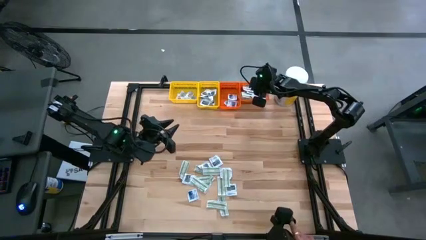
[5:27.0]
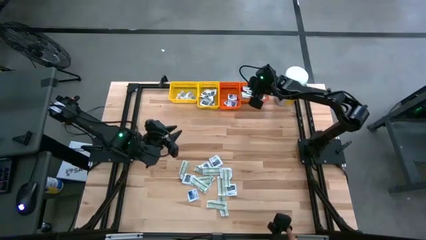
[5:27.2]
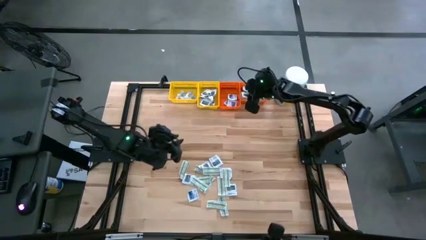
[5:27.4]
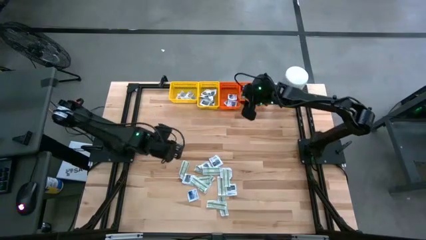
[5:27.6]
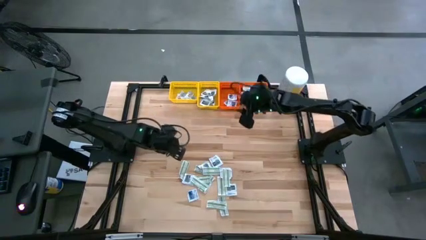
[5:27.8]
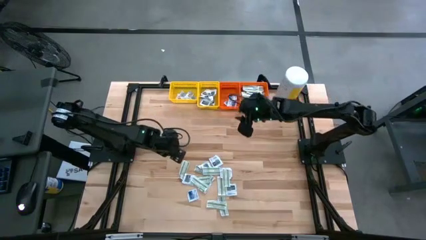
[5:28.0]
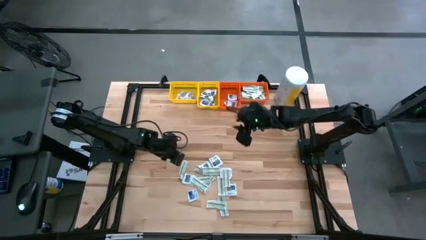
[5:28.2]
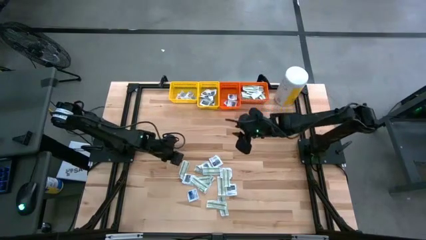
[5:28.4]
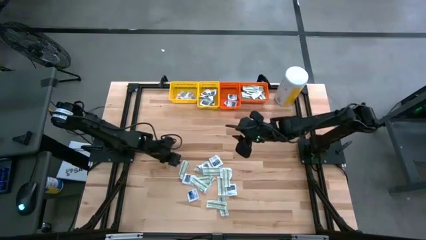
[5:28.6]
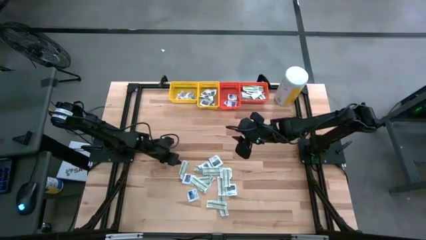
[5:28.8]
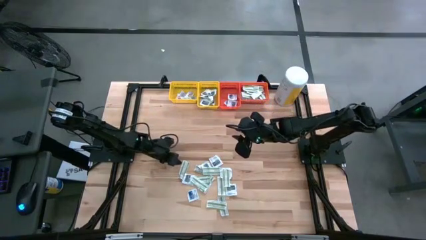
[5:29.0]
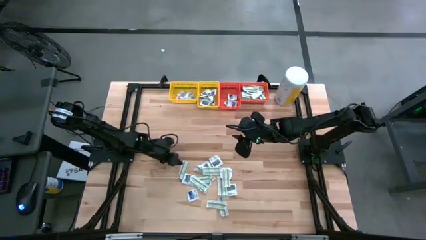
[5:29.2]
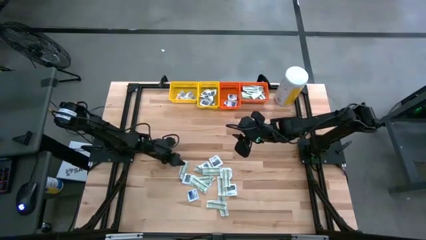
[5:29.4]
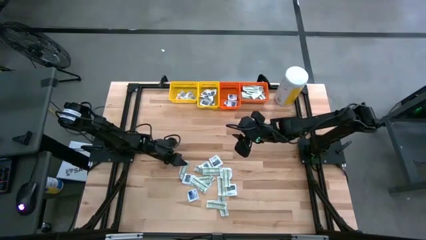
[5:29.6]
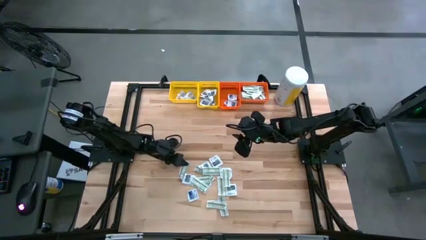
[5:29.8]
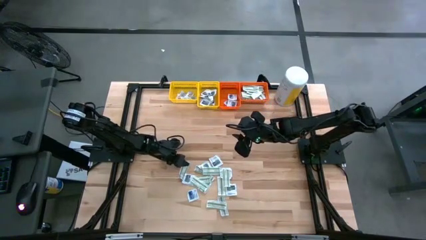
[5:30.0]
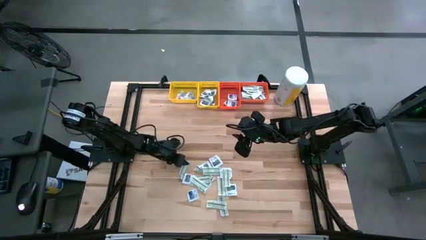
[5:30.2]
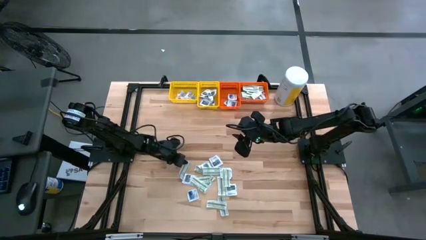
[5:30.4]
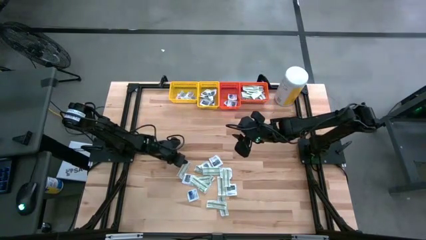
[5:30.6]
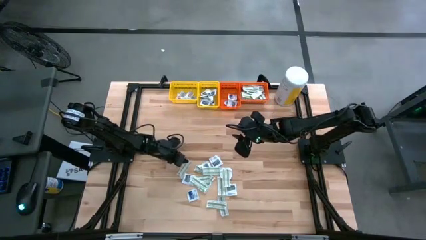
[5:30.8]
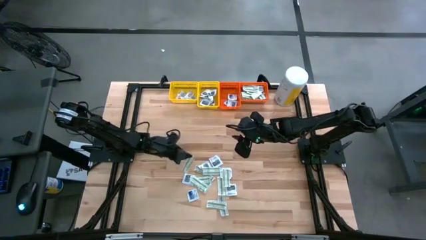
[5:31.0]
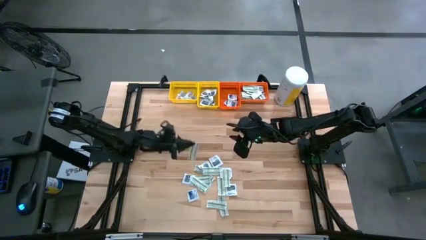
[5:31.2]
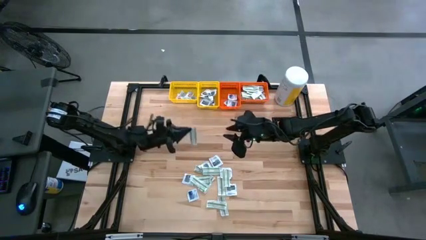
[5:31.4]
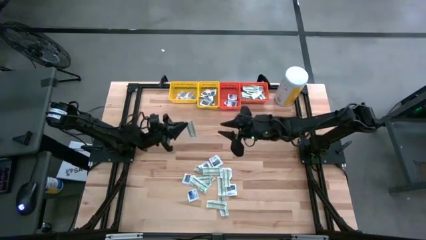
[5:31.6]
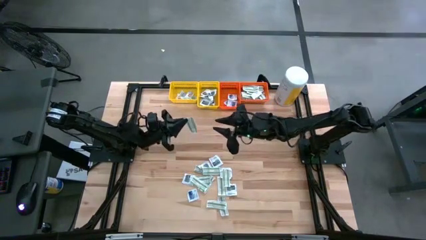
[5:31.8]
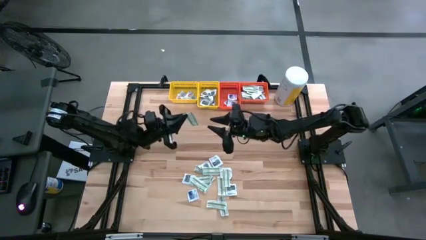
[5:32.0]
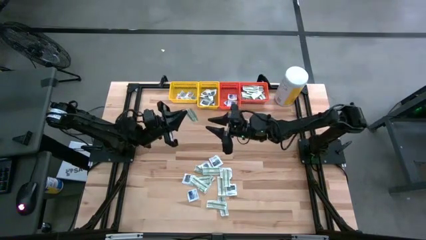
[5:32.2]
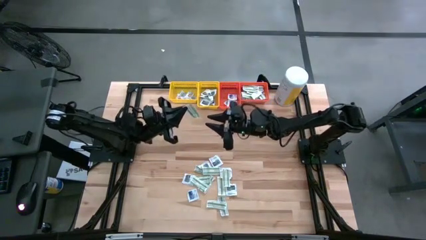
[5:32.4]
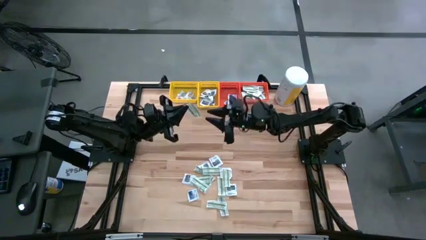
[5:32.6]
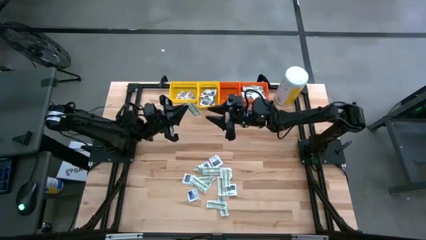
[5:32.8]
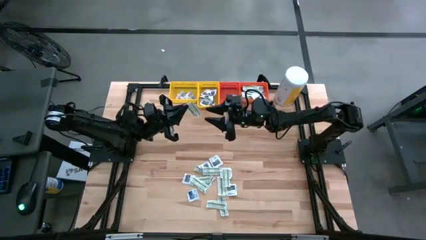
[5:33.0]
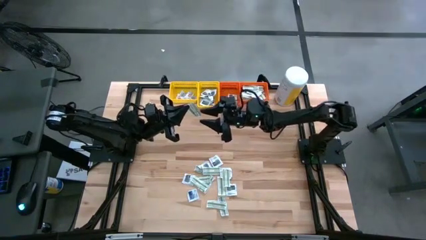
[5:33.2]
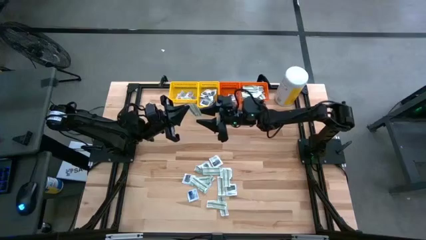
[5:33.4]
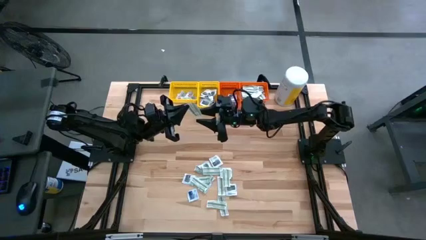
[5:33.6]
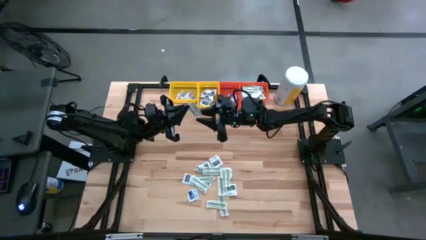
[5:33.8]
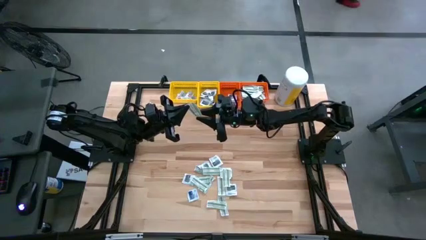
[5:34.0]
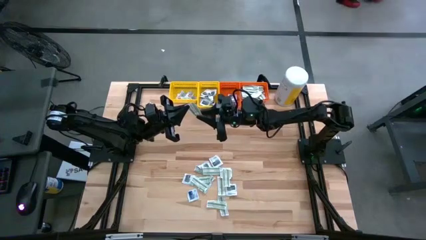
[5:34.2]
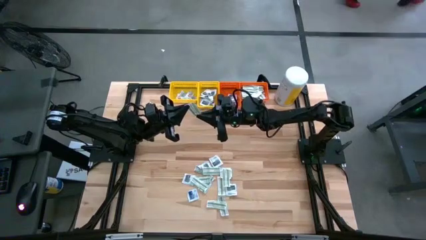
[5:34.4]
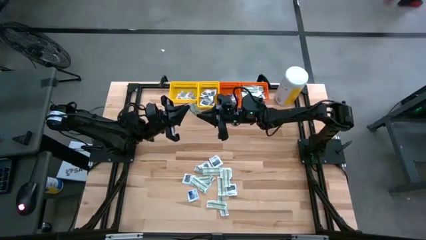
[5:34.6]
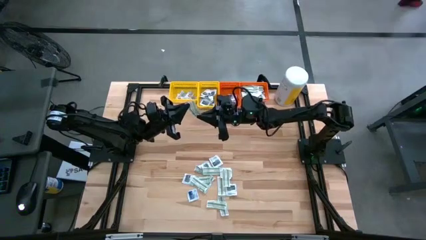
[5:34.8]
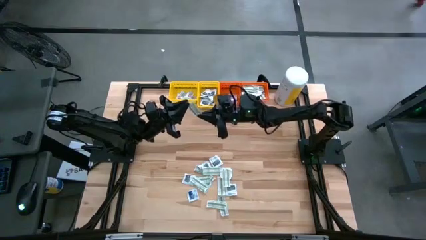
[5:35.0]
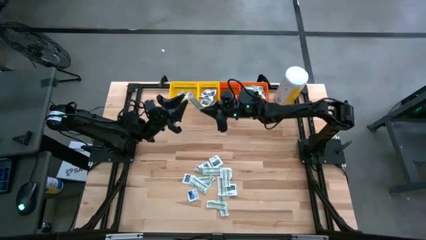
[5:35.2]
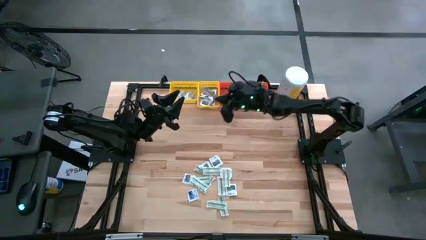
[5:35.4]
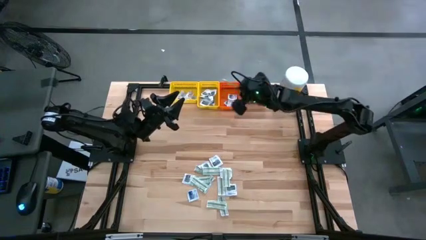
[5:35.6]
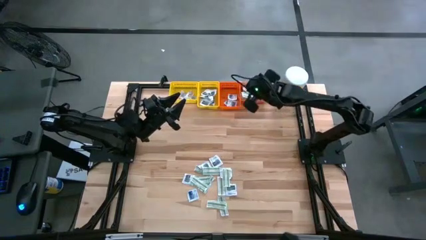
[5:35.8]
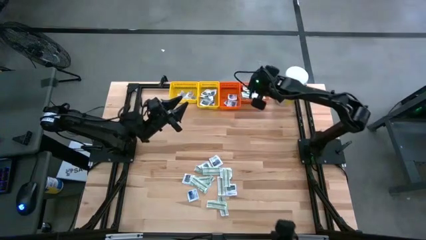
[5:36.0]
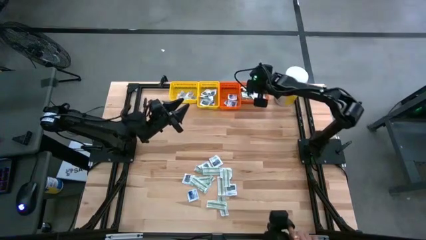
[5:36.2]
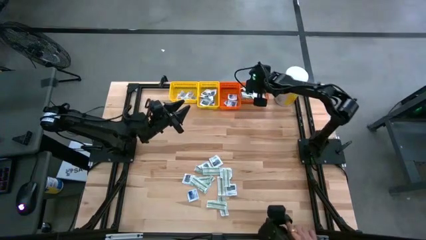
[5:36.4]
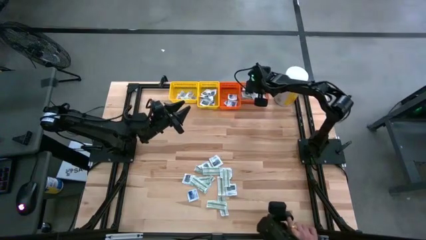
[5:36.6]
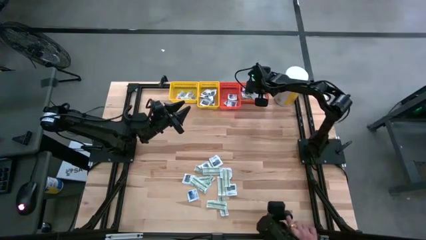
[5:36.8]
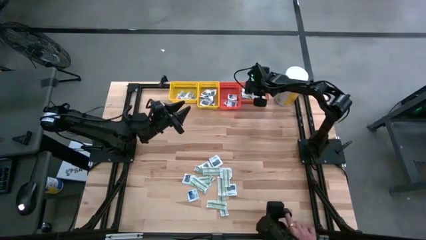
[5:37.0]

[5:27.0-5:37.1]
Task: Pick & Place First Aid Supplies
Put the green pad into the right orange bin

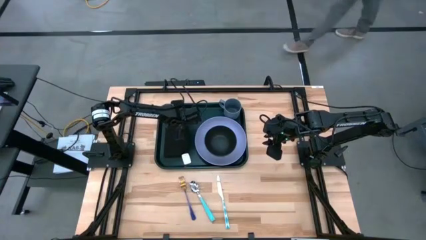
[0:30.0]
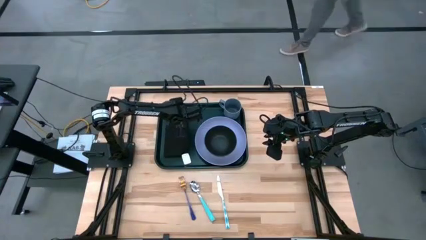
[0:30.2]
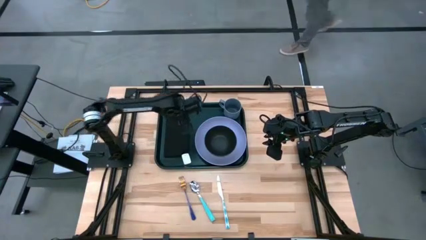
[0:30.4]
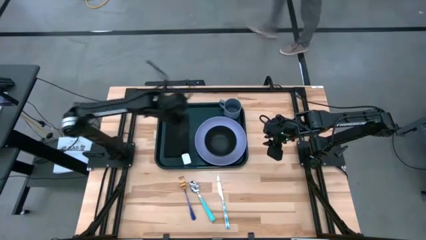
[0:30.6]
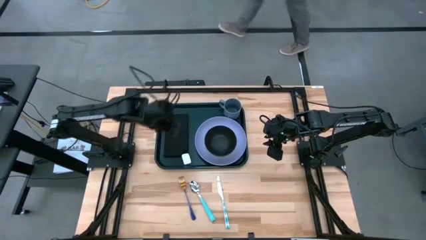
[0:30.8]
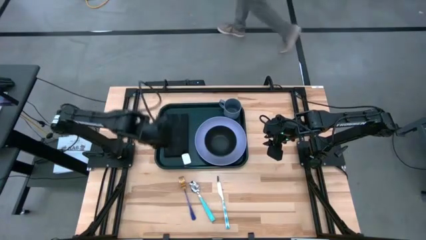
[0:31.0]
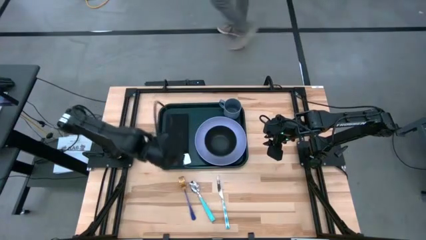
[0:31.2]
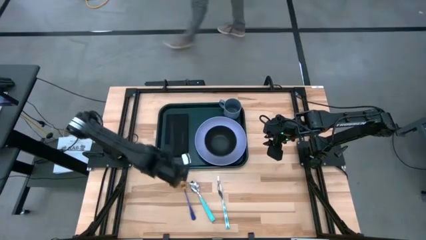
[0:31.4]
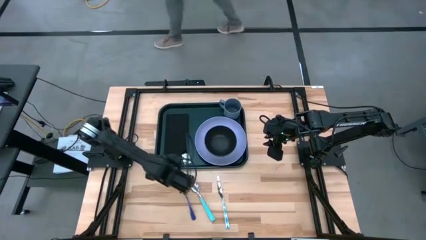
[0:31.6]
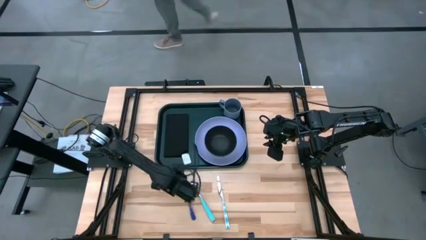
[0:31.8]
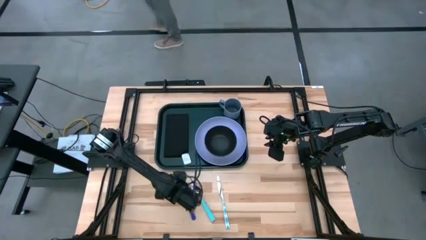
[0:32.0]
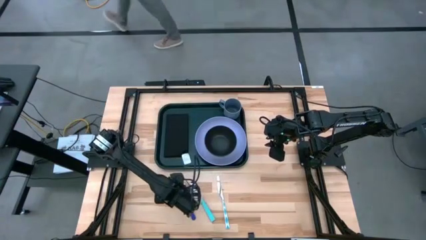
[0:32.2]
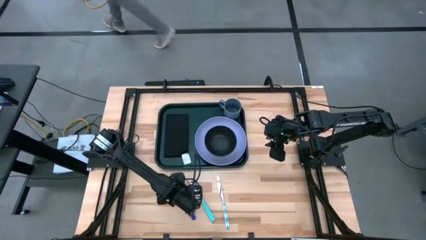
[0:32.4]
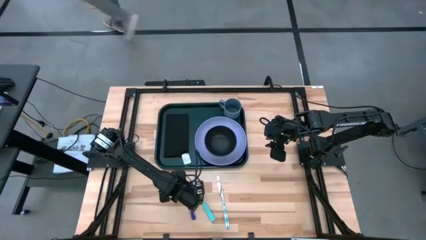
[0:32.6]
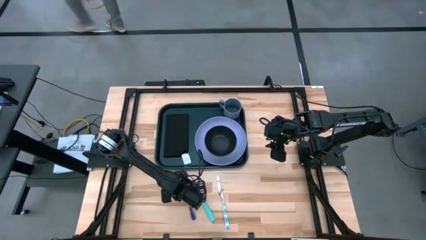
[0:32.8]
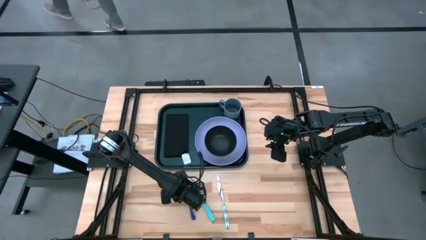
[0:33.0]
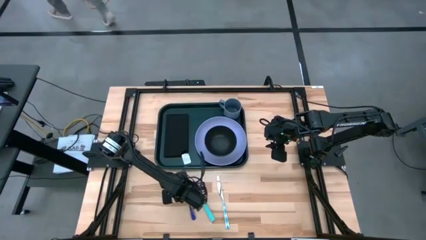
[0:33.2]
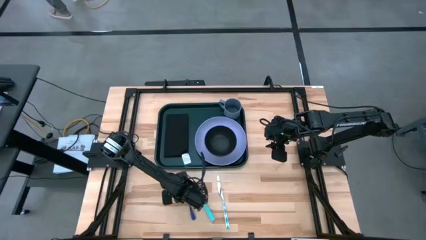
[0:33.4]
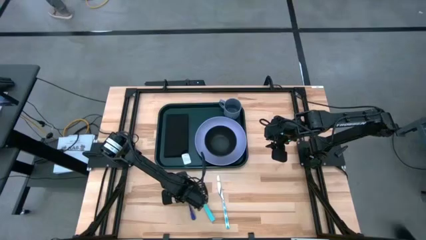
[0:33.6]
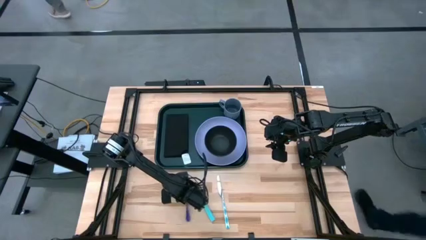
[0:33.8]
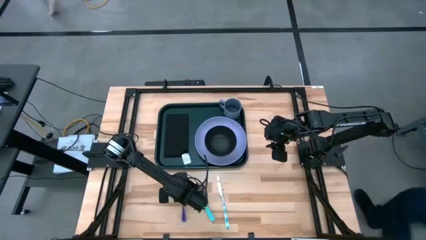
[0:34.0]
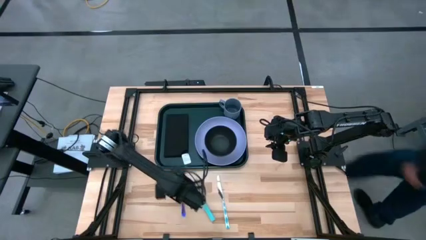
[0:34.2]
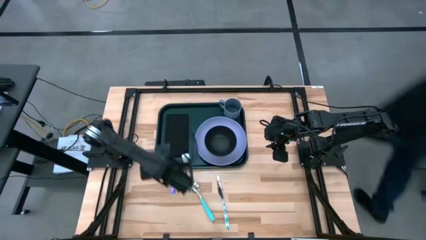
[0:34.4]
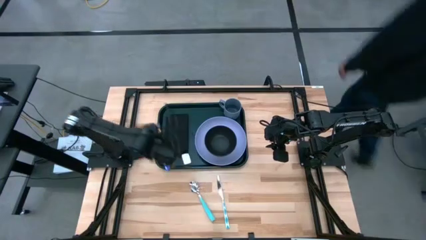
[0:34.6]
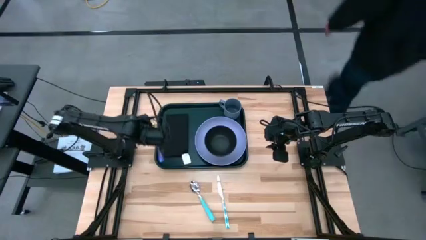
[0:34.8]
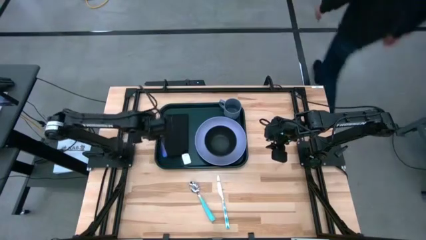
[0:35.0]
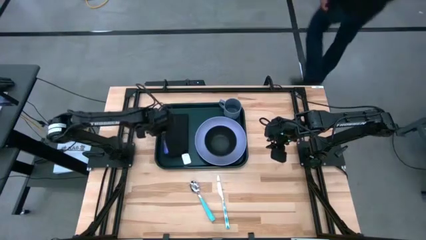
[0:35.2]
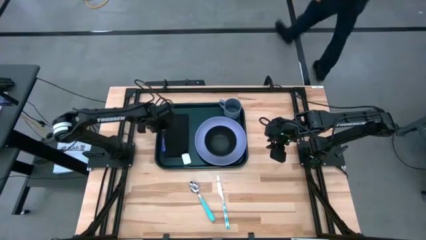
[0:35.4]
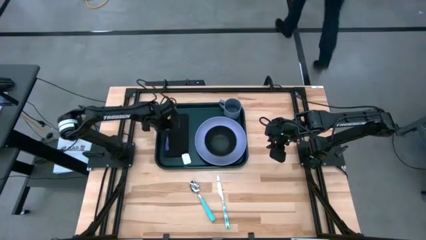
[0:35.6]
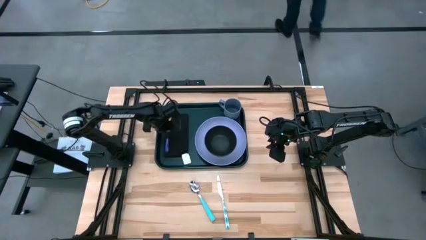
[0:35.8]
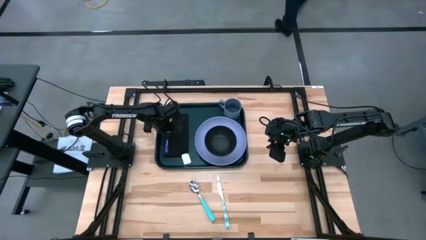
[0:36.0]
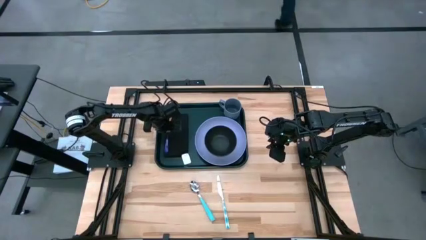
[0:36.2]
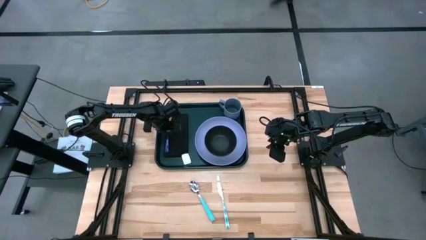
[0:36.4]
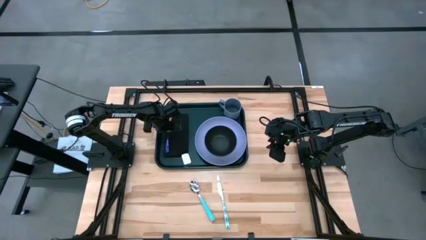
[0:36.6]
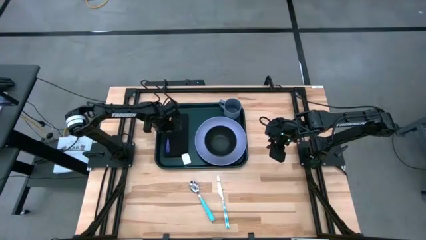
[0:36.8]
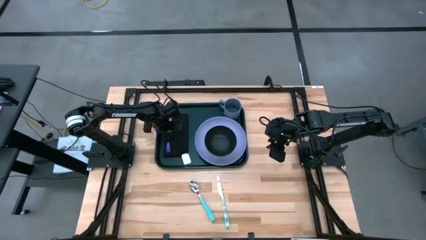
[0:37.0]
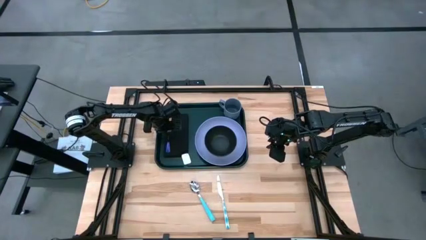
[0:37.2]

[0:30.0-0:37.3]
Task: Set up tray
Put the purple fork on top of the black napkin
